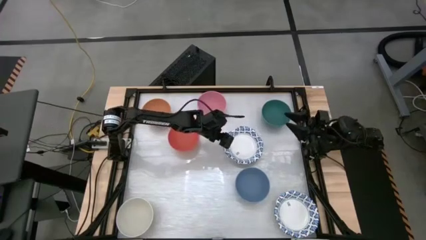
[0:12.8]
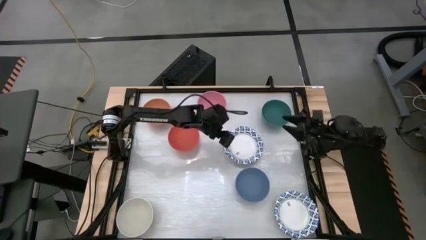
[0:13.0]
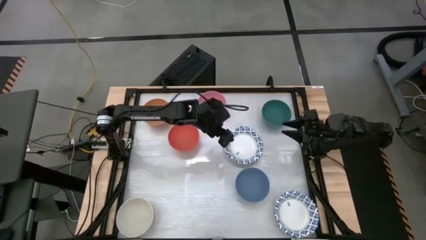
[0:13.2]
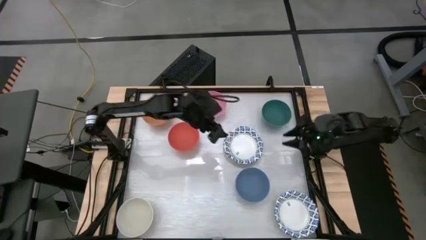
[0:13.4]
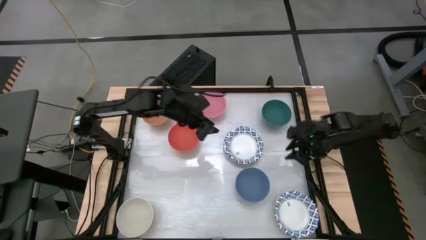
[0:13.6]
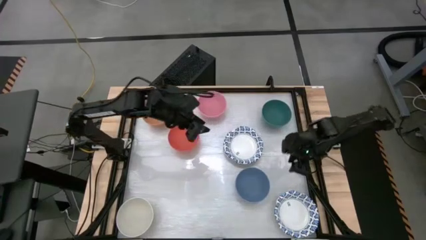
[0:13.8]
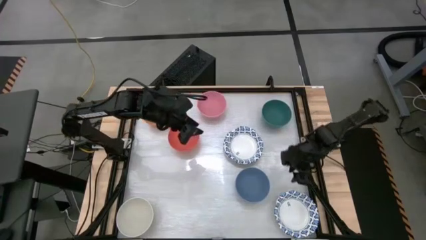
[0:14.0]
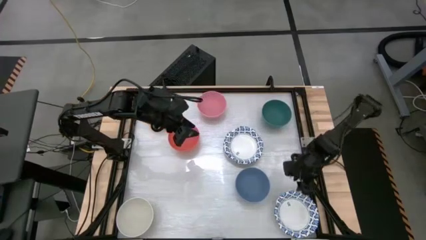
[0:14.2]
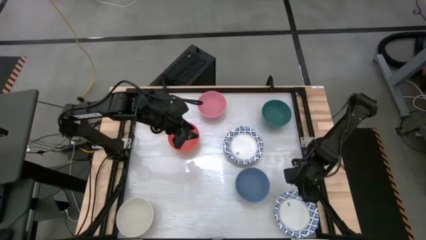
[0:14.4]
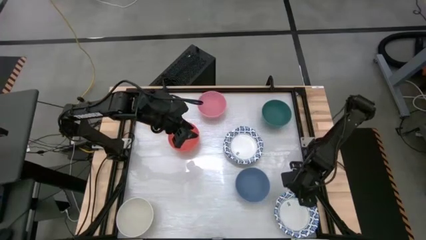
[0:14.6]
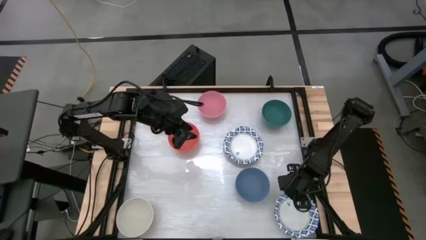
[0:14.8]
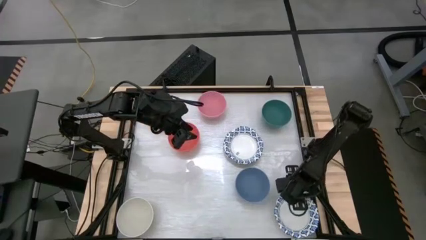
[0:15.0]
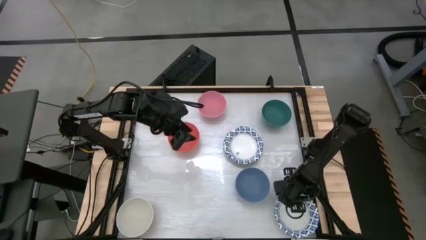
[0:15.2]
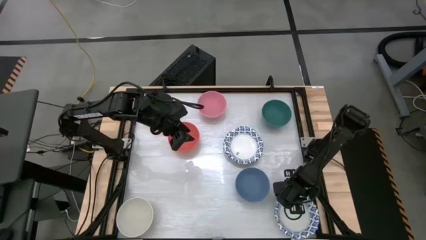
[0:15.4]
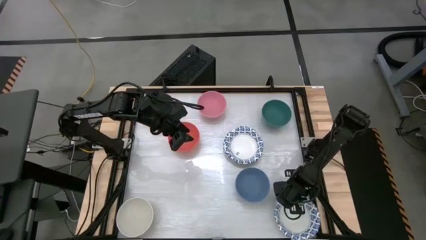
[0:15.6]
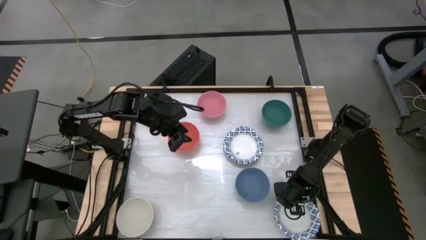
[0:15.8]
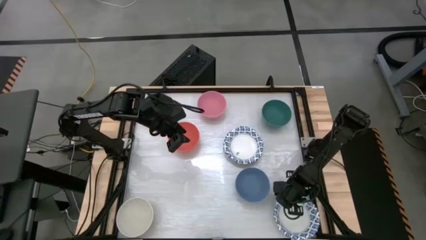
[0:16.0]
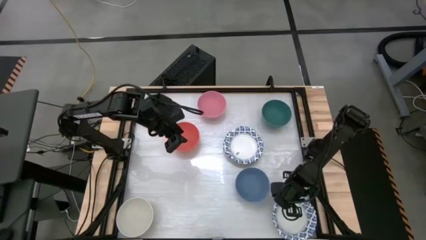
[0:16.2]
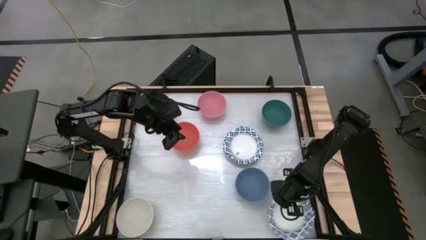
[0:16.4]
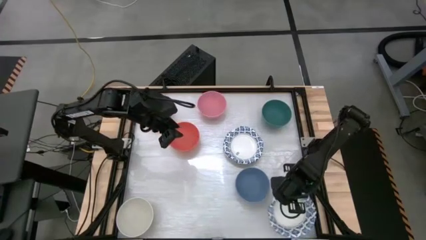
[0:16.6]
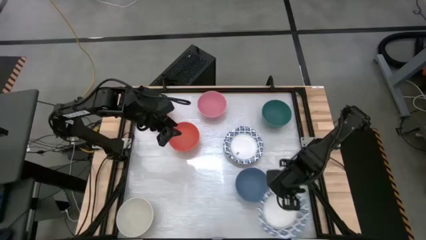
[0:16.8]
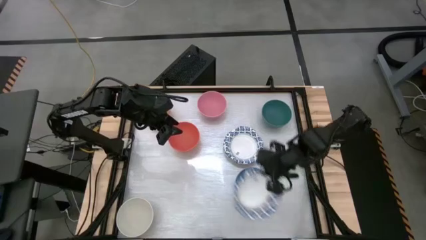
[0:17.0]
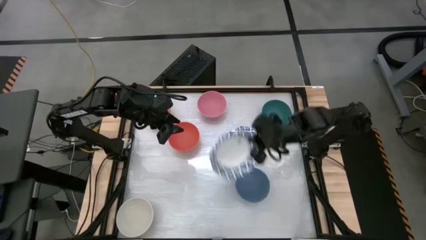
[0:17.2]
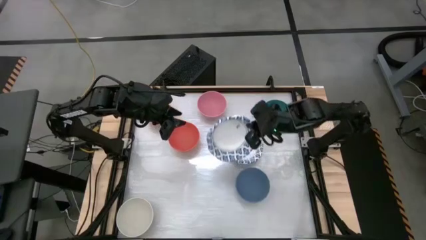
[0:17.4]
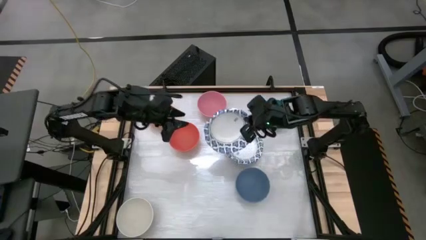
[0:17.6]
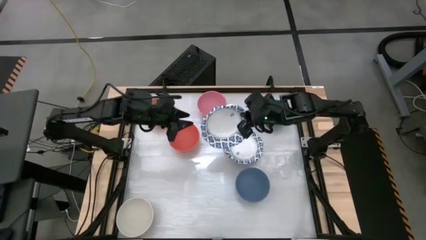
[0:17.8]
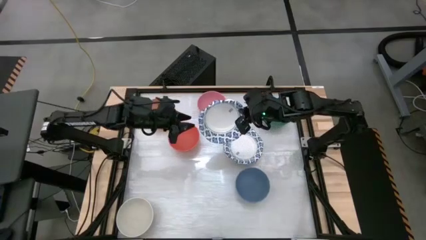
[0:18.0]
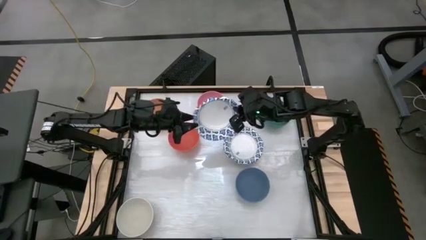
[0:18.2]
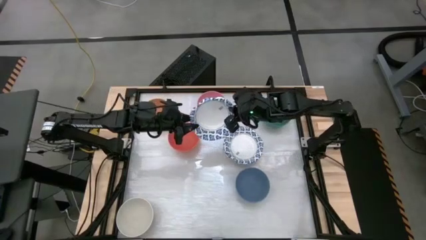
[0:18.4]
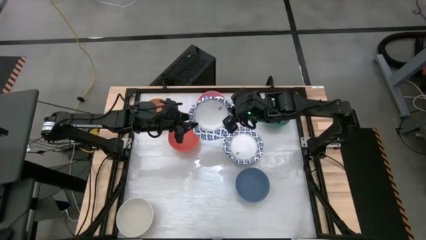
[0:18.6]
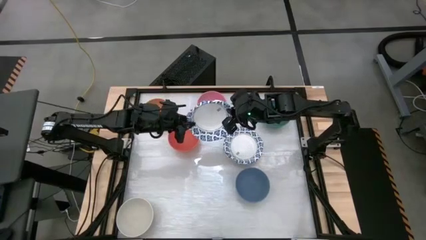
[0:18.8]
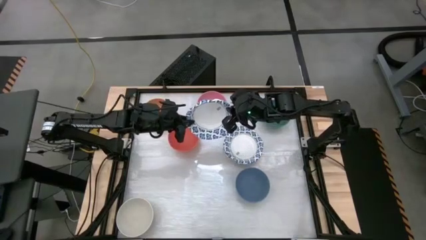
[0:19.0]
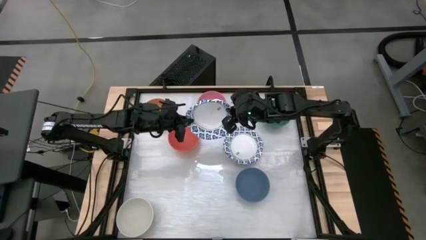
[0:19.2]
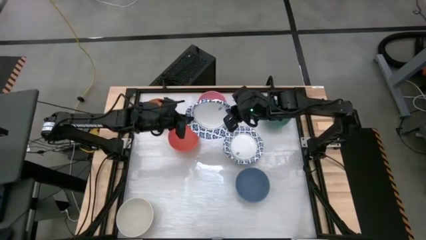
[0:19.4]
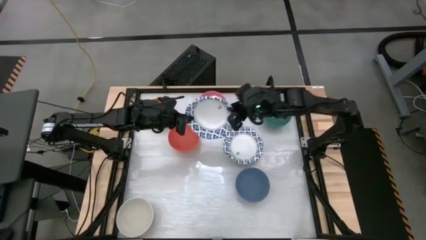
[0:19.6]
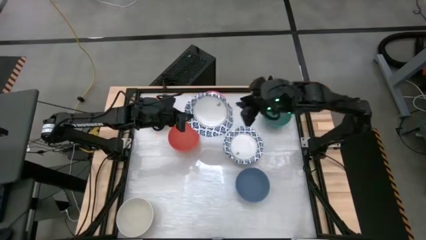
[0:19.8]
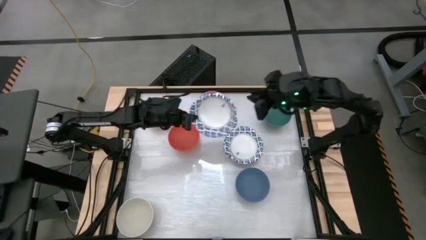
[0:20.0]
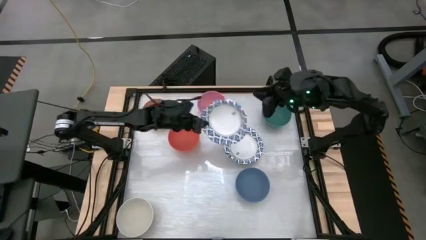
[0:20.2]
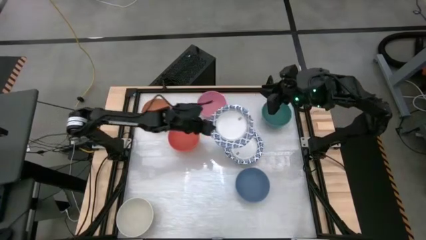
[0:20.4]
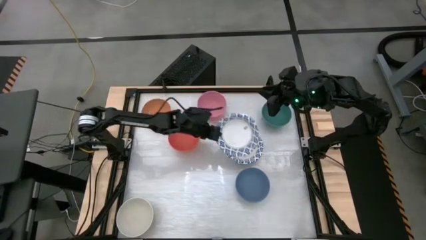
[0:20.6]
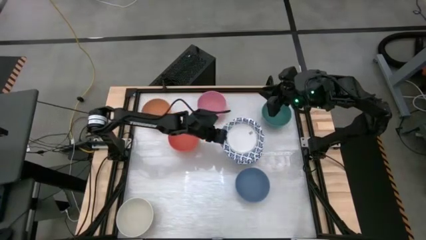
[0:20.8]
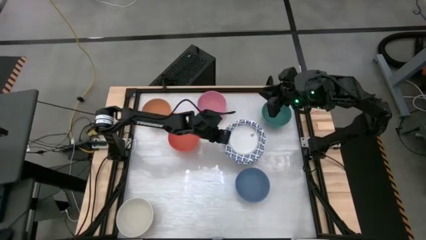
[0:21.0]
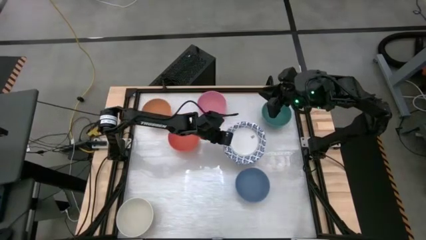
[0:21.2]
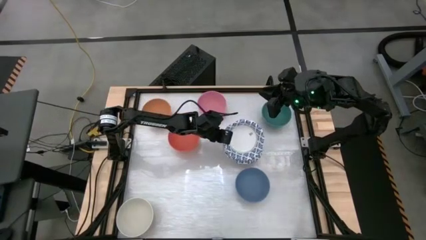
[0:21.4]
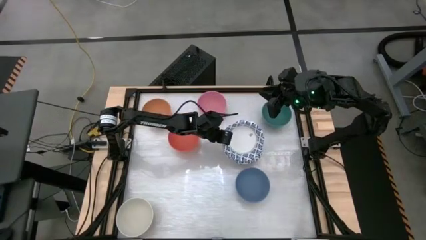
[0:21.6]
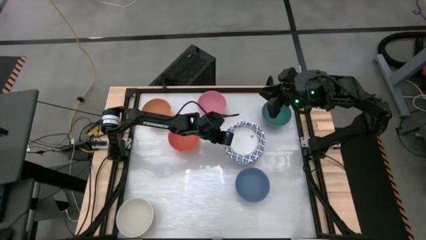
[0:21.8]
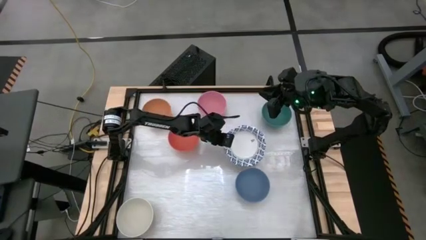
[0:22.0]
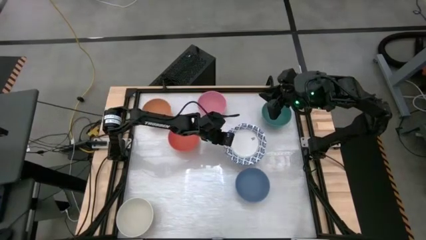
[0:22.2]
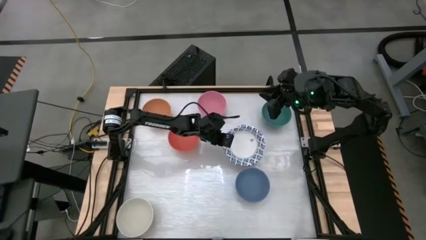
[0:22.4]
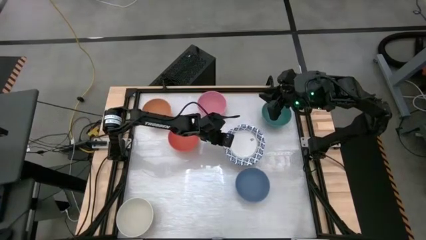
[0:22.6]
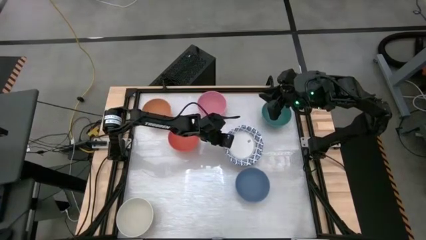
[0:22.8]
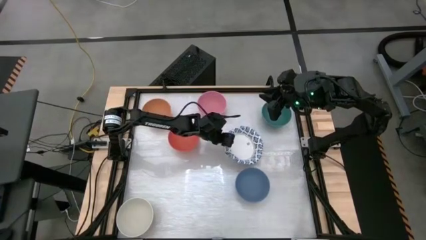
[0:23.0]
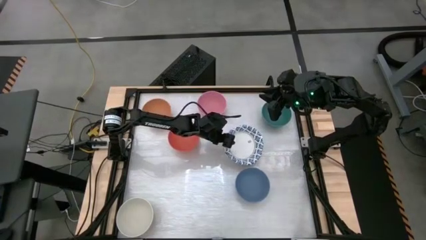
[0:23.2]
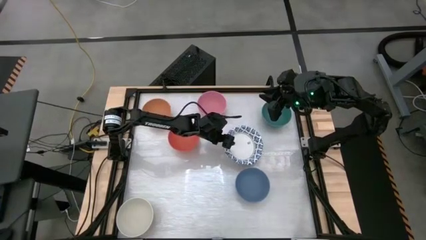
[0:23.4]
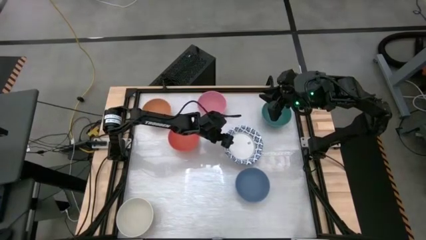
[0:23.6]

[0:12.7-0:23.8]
Stack the bottom white patterned bowl on top of the top white patterned bowl

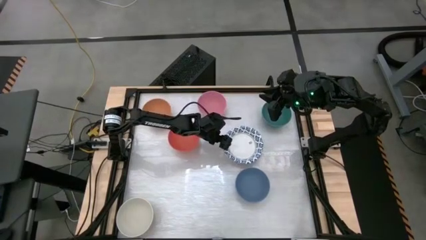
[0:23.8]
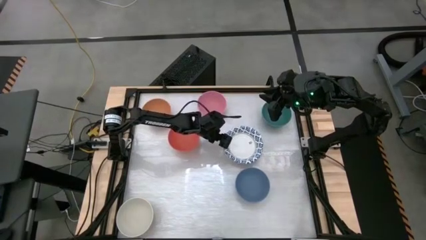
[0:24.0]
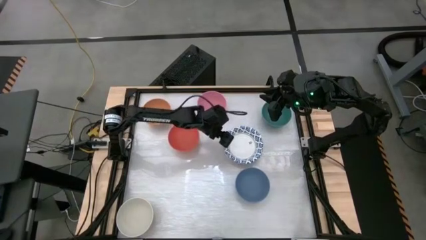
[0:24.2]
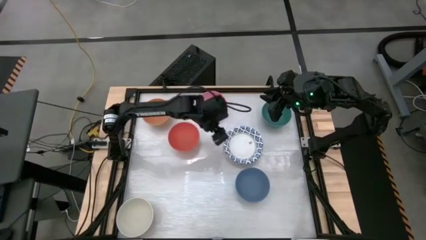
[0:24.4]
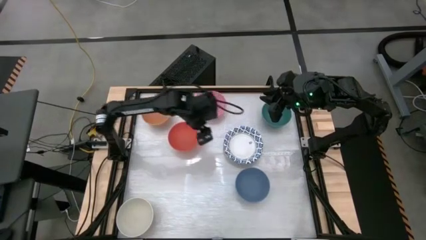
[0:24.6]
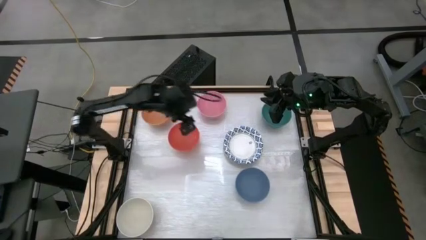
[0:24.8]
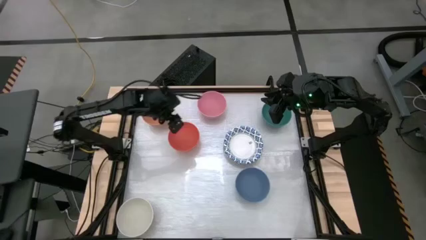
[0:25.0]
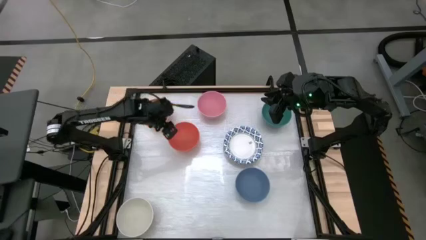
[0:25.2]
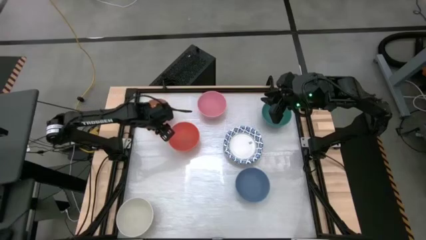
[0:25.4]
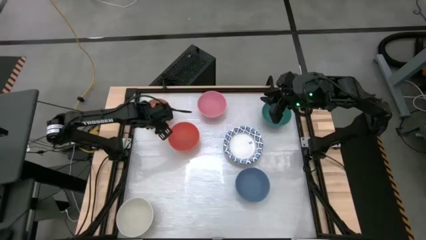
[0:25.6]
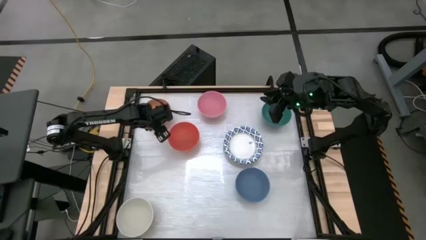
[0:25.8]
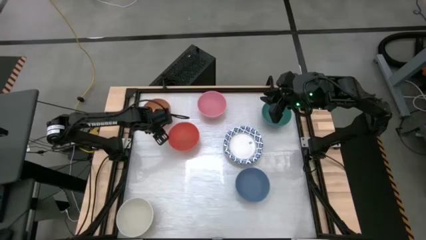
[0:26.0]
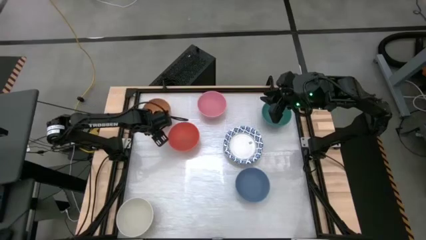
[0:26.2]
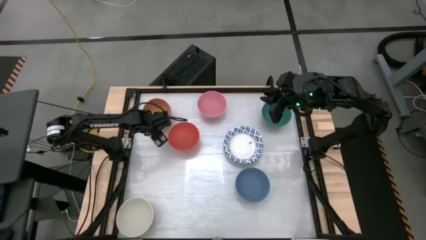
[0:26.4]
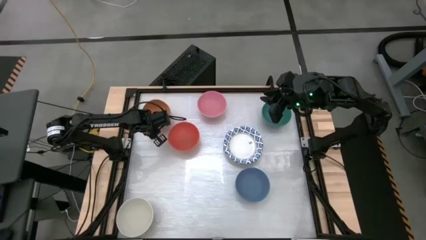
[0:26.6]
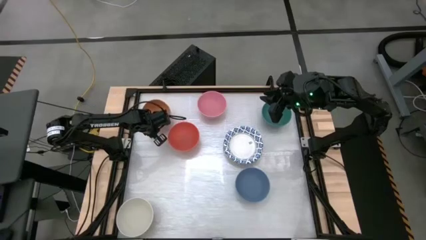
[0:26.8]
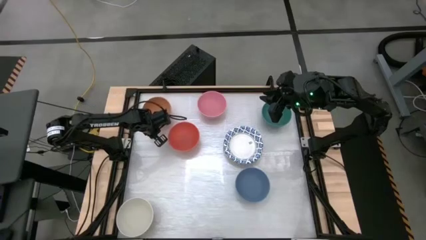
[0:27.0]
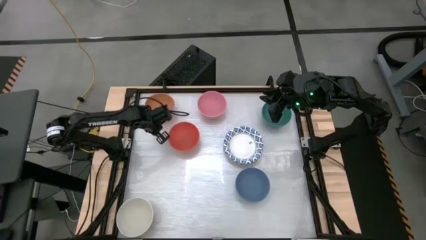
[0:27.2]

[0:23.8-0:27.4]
Stack the brown bowl on top of the white patterned bowl

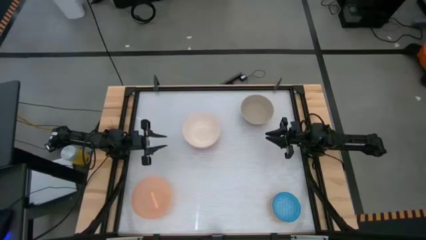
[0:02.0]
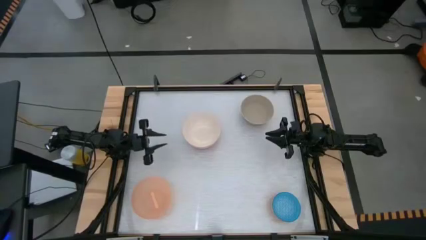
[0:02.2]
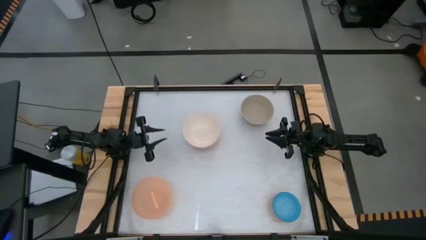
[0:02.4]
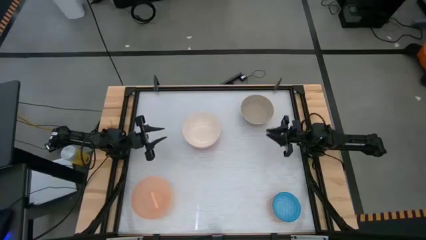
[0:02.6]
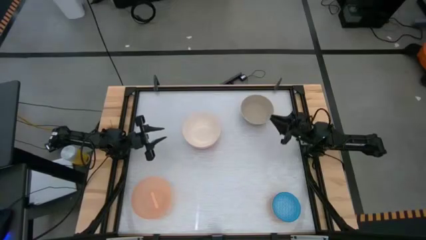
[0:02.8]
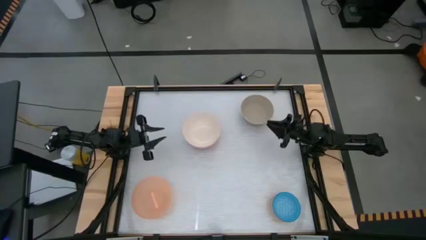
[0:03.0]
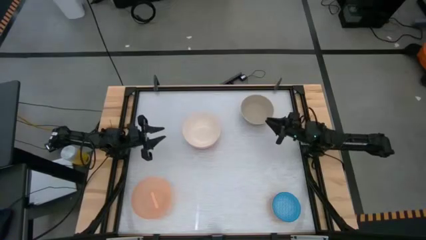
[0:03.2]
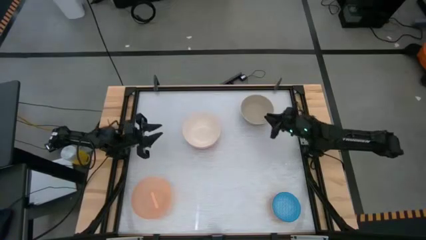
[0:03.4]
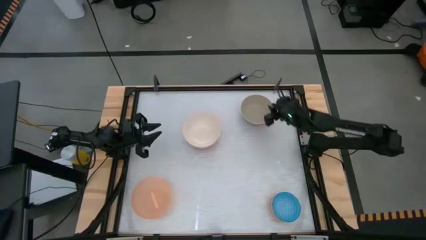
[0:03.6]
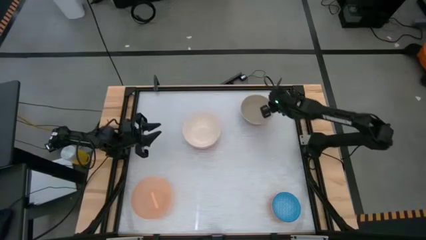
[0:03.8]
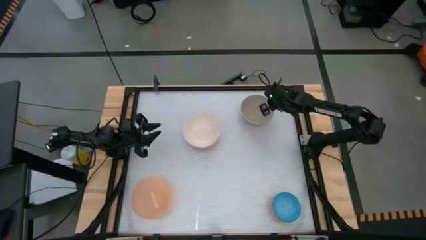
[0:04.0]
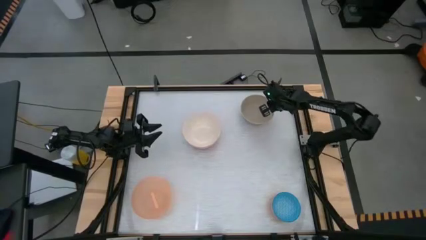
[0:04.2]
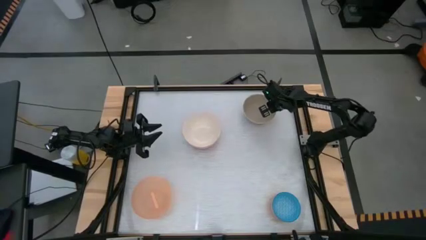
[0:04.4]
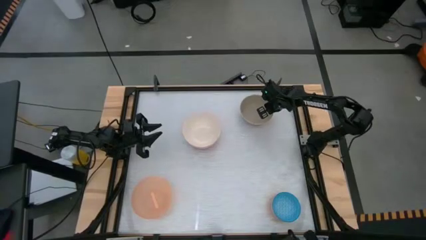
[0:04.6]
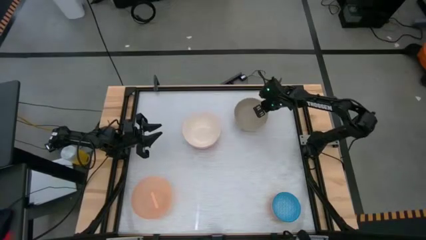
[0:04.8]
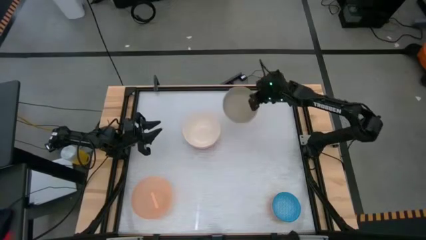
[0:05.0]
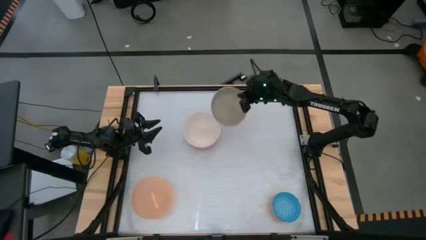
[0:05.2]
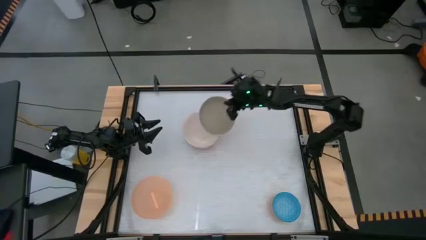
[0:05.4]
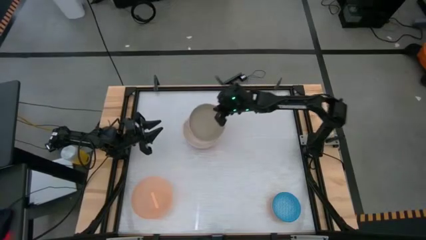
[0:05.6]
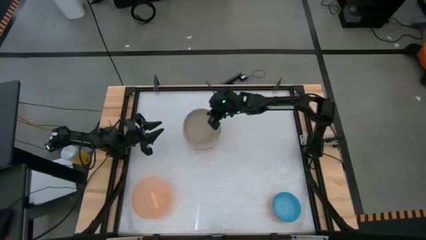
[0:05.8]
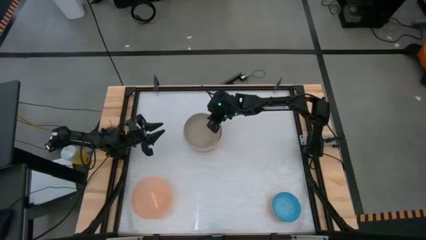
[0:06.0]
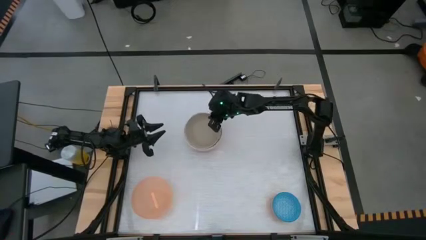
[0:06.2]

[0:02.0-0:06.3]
Stack the gray bowl on the pink bowl
